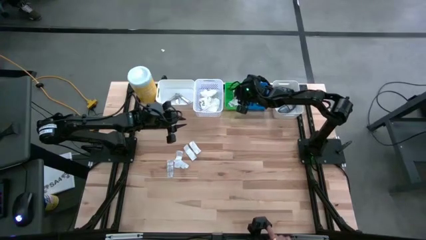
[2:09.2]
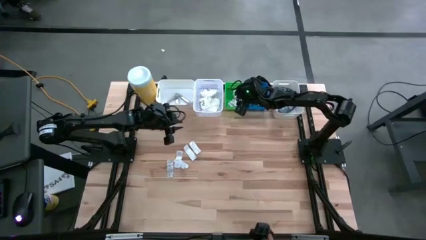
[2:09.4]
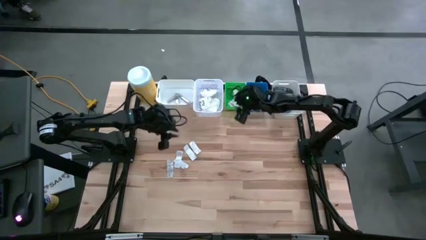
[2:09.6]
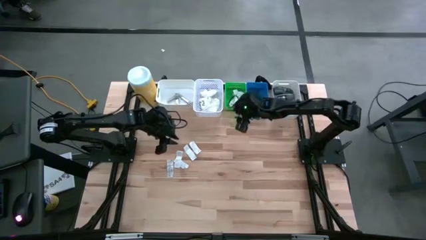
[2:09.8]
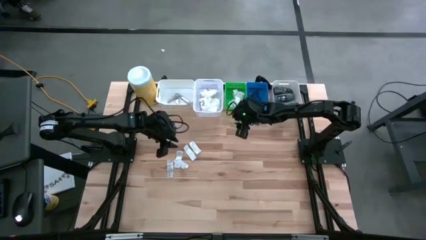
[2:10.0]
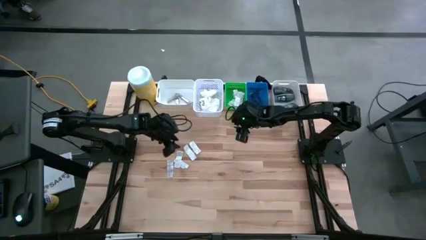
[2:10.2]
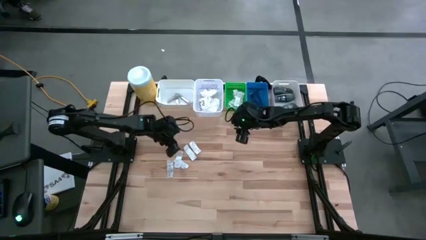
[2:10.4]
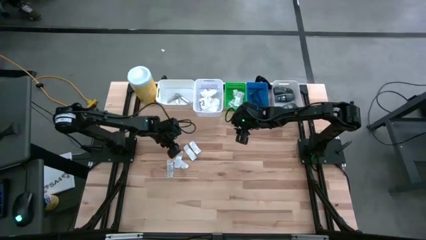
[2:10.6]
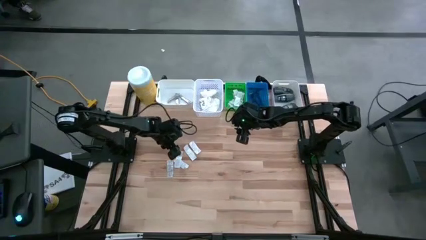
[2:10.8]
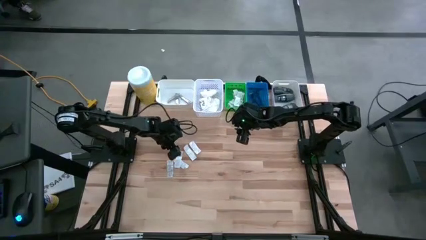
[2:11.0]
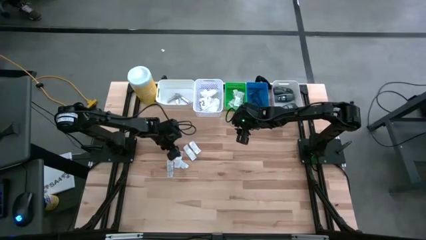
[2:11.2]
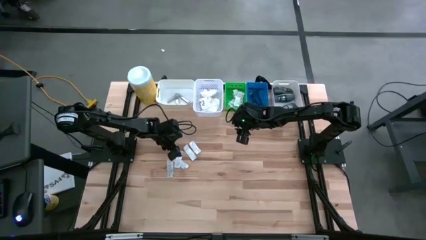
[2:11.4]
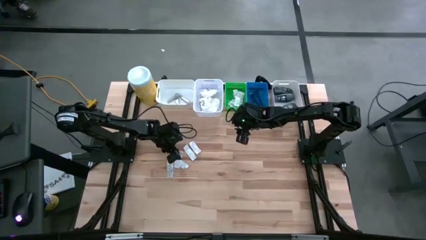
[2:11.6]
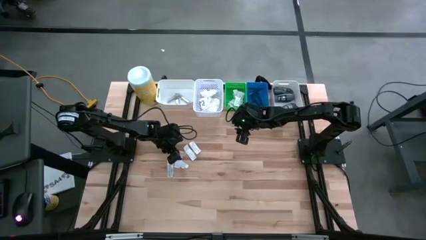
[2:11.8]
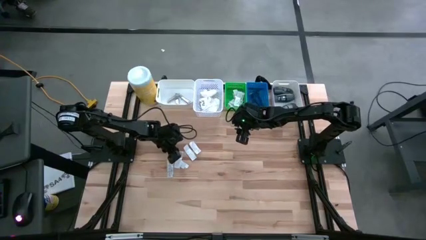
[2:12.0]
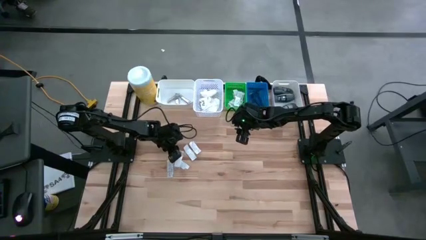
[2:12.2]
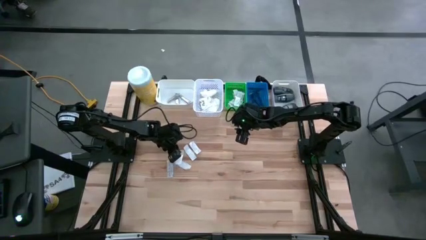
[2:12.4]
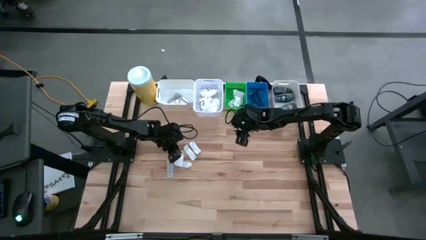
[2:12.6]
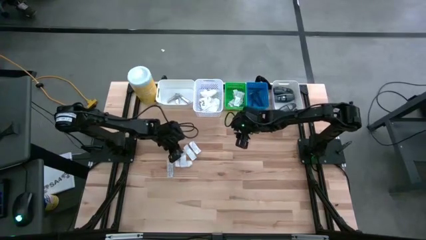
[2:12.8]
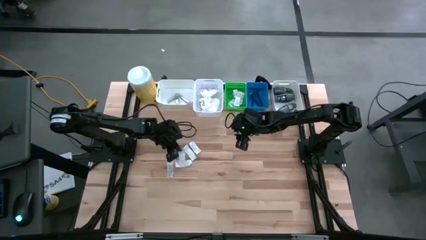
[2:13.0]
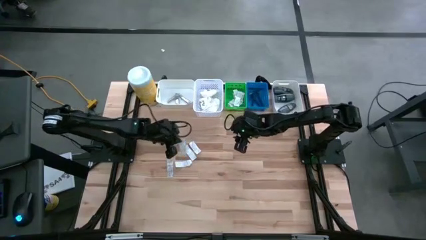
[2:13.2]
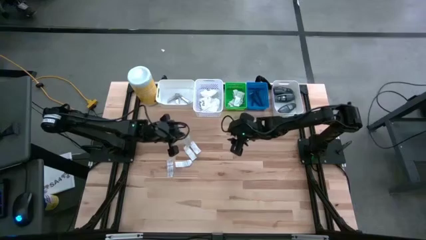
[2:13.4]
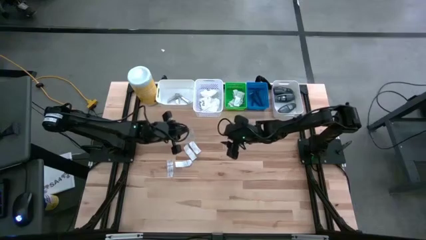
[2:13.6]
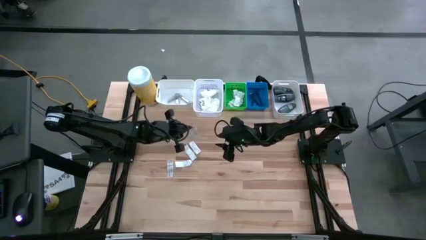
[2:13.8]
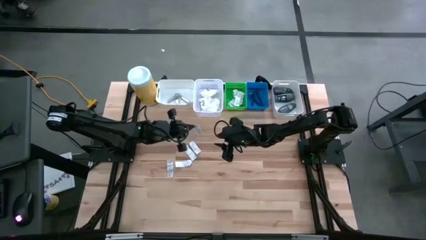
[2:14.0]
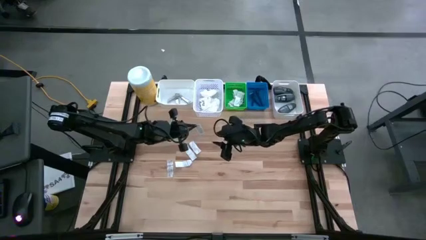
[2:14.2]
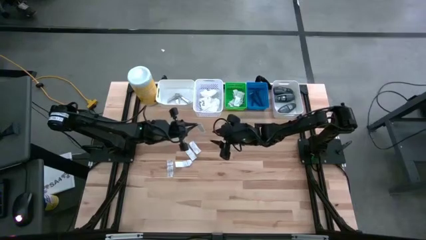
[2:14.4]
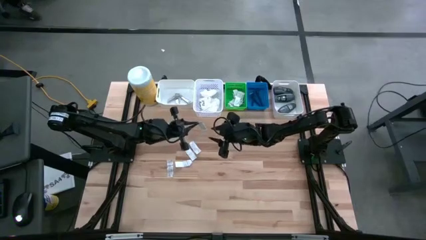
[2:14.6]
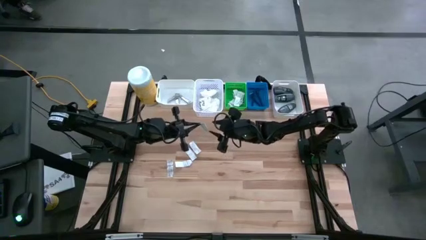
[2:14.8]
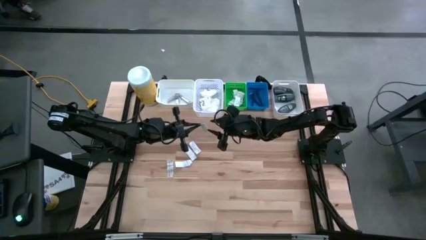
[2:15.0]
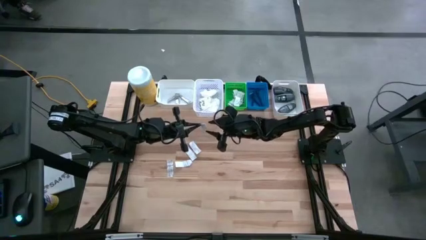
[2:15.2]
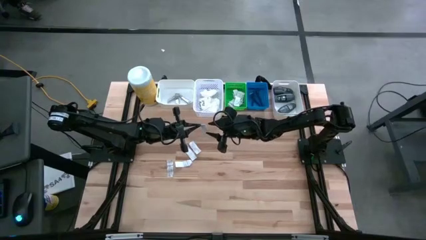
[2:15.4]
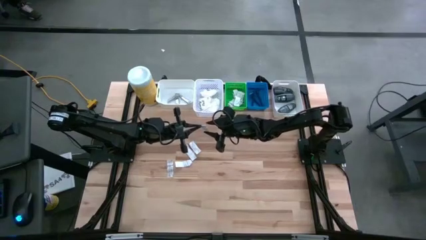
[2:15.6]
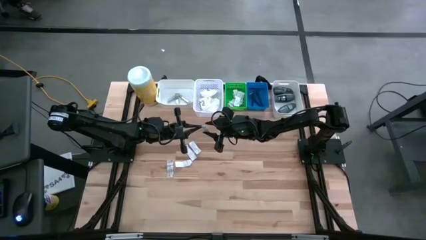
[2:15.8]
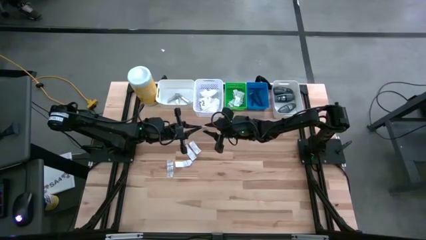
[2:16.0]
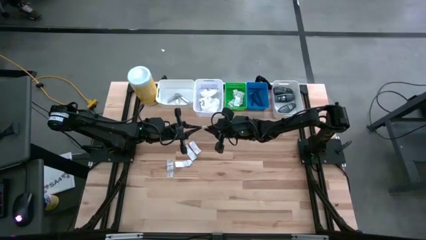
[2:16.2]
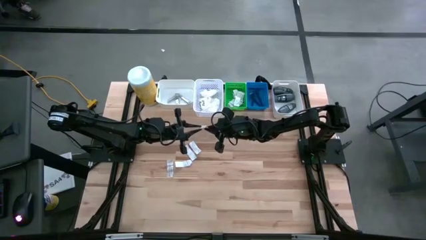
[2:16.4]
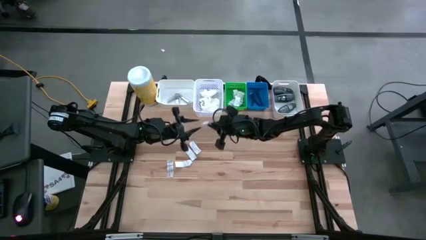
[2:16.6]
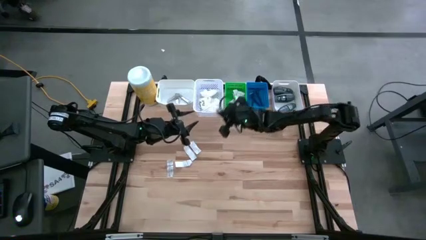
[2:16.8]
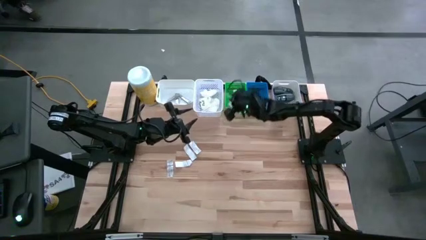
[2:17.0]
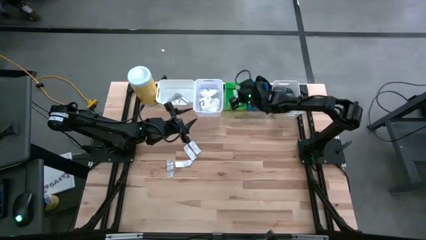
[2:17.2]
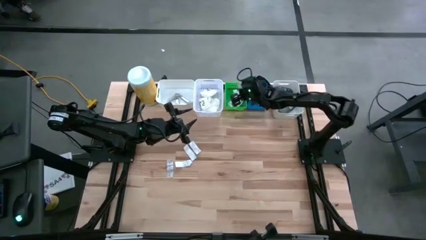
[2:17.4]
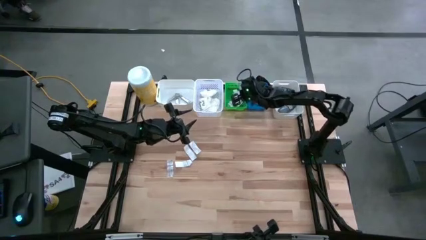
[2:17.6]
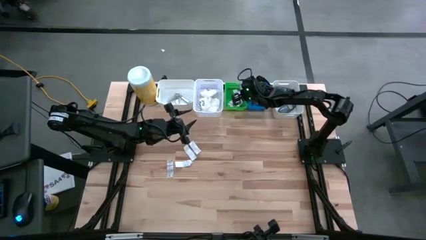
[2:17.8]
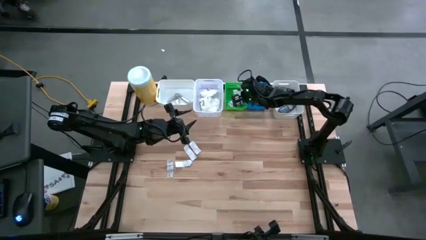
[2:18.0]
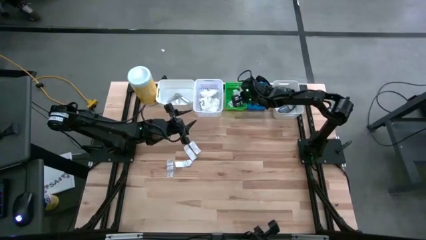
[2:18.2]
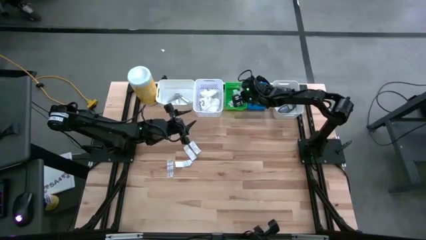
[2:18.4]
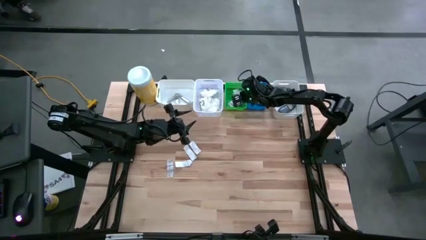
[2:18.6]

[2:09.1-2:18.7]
Task: Pick & Place Travel size toiletries
Put the white bandage into the green bin

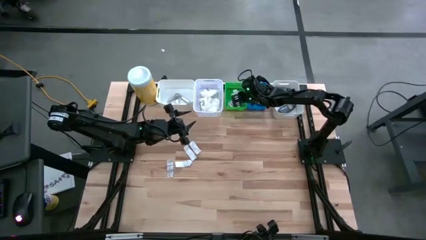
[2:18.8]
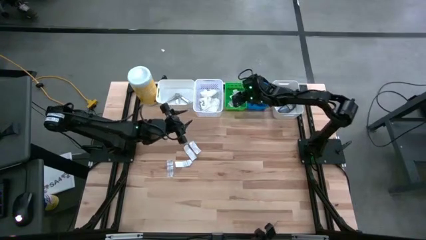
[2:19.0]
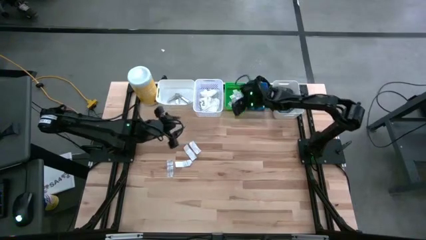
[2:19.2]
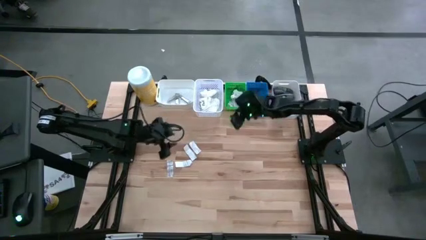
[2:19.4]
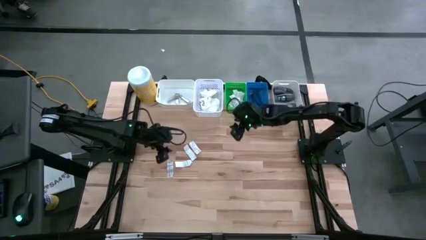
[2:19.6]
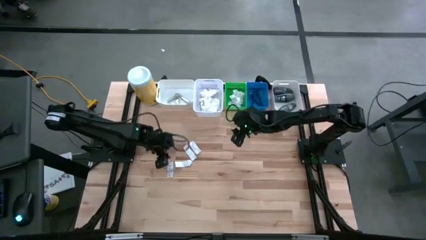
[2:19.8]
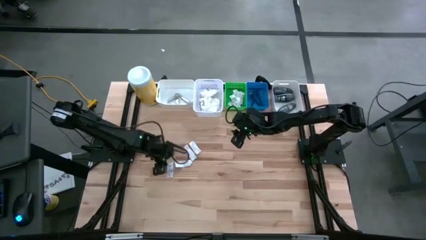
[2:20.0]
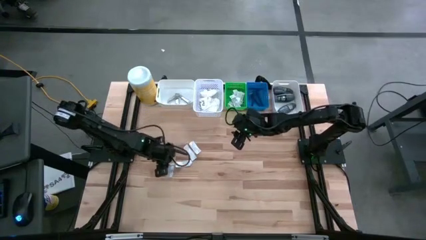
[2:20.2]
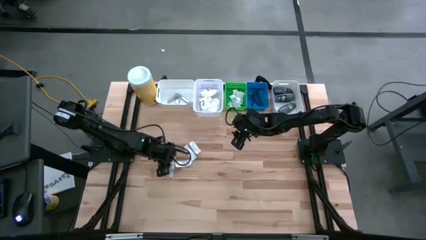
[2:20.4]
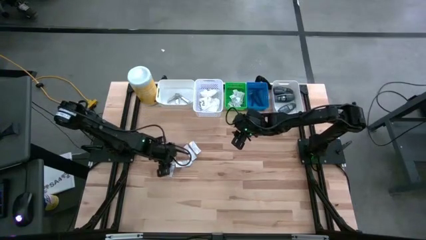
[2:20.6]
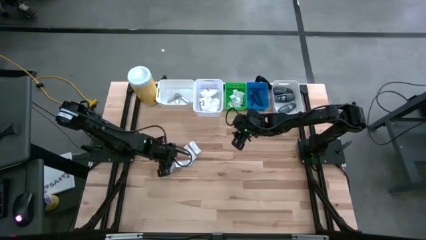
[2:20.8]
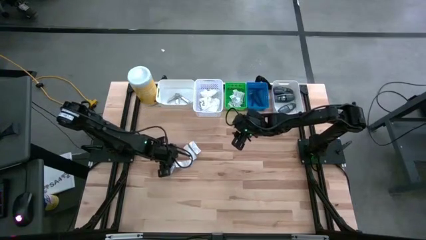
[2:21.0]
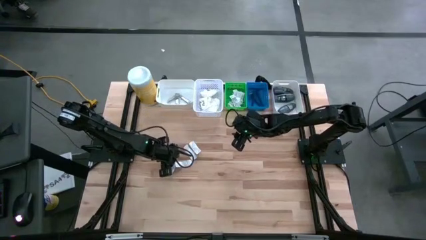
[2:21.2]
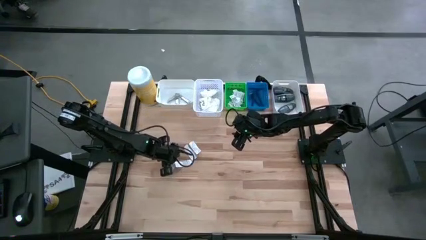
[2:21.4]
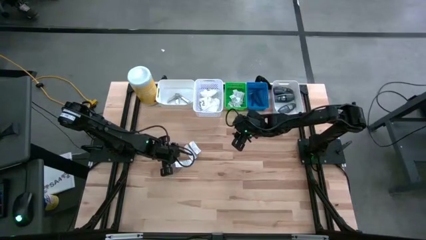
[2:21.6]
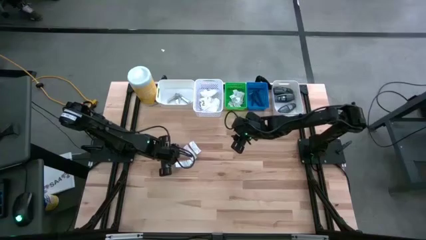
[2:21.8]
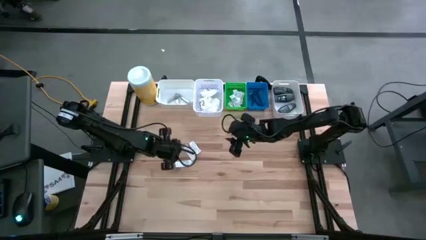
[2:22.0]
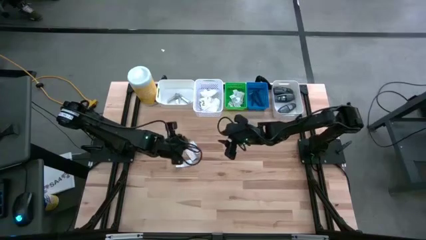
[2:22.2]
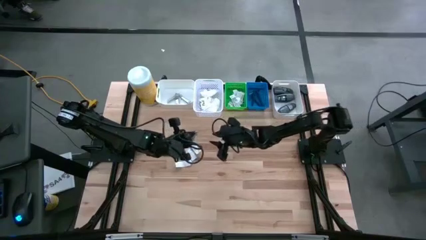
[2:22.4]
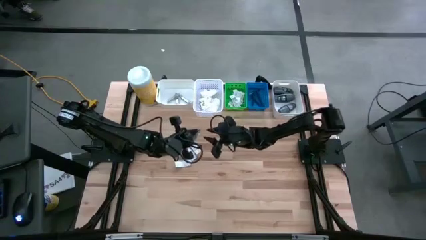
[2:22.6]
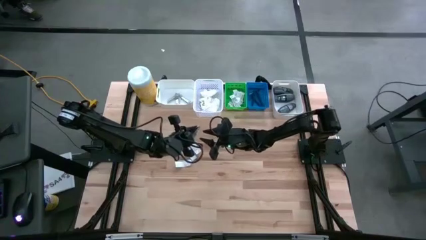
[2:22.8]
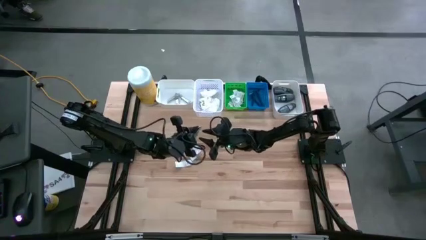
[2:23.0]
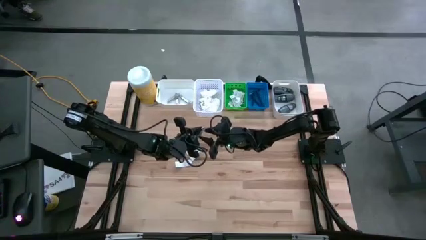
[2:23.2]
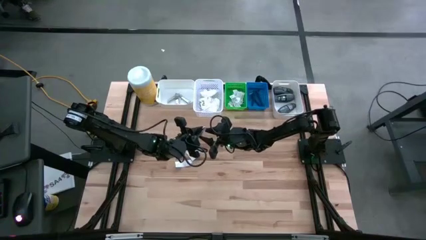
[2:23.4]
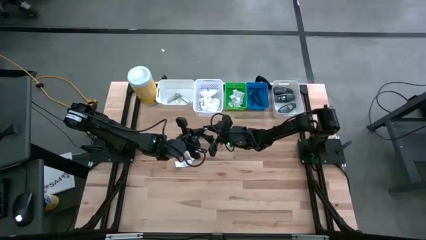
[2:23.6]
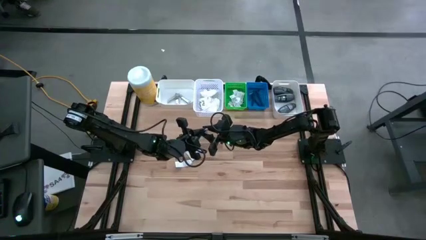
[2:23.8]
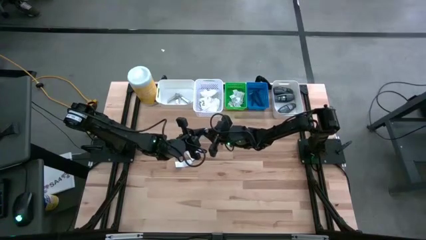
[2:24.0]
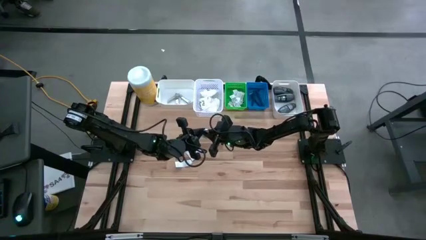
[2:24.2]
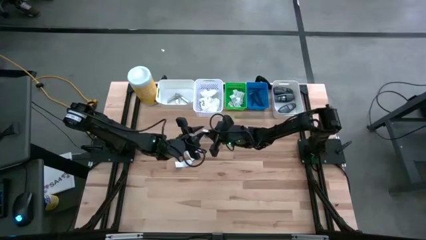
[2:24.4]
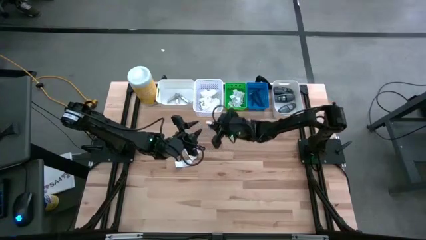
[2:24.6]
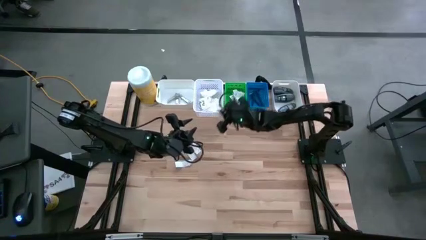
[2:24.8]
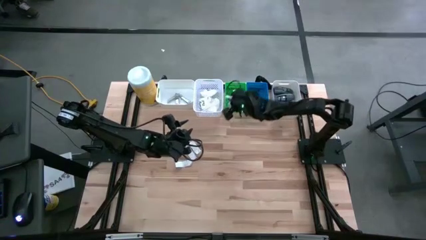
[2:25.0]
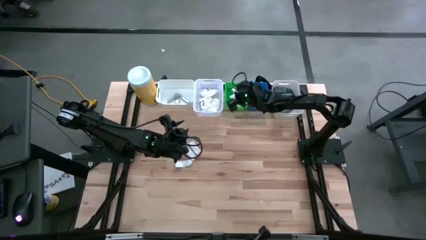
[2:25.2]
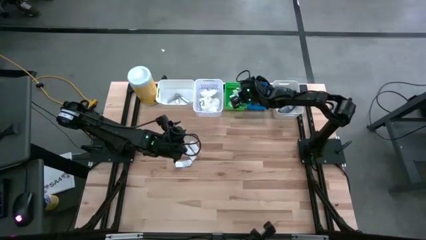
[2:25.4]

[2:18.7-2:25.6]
Put the white bandage into the green bin
